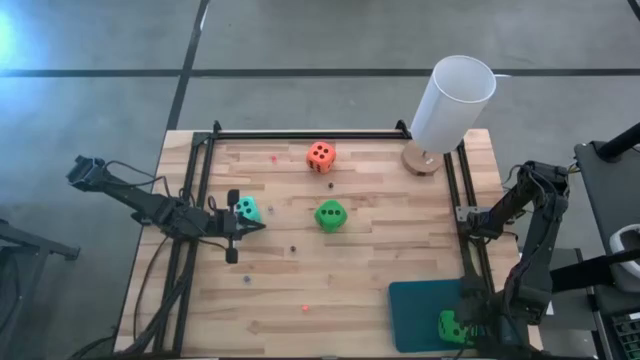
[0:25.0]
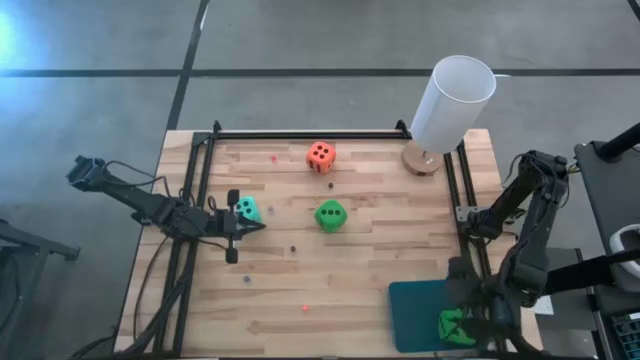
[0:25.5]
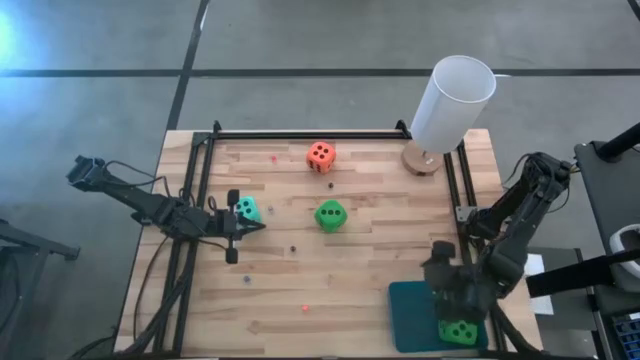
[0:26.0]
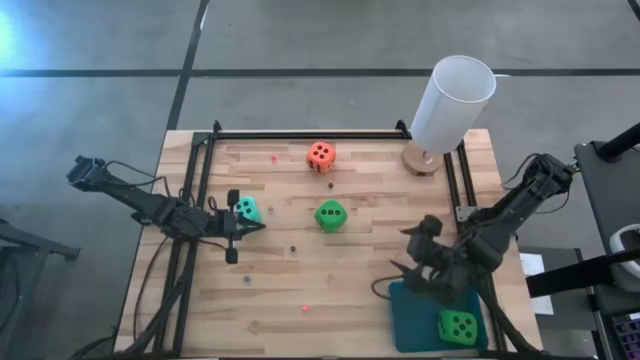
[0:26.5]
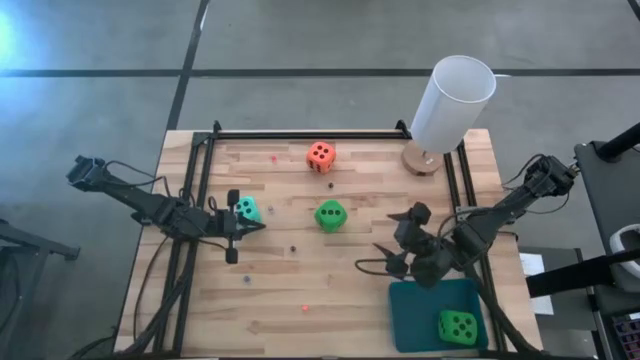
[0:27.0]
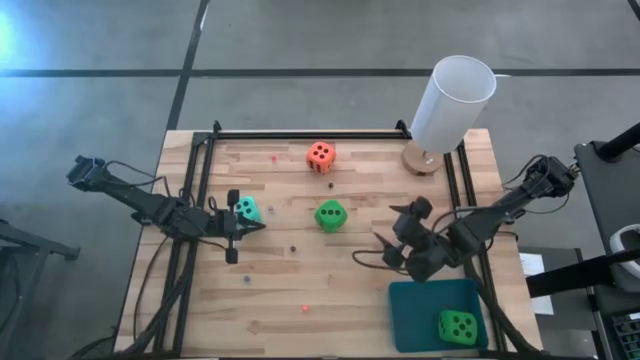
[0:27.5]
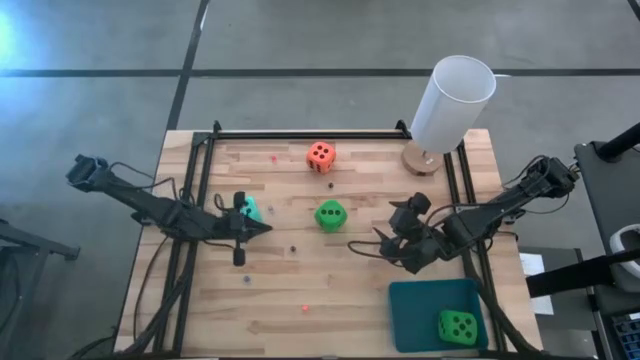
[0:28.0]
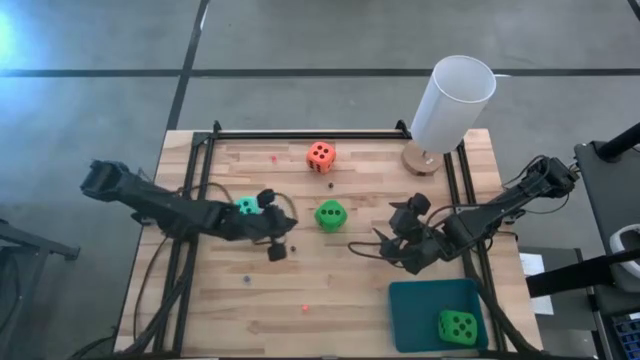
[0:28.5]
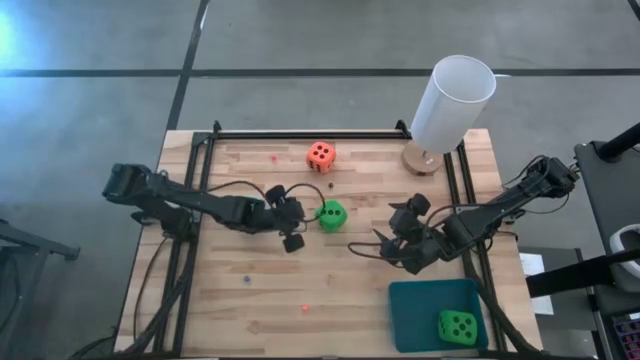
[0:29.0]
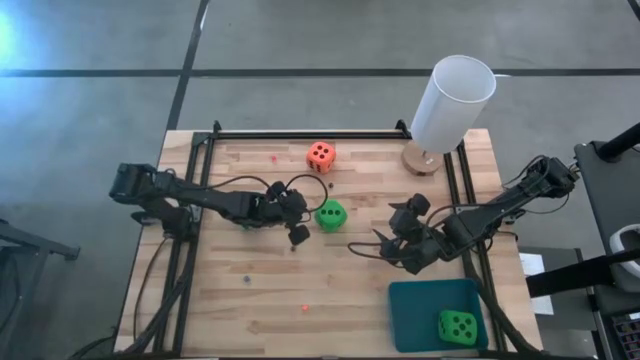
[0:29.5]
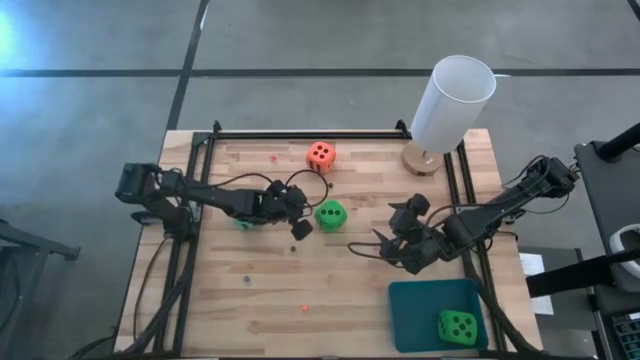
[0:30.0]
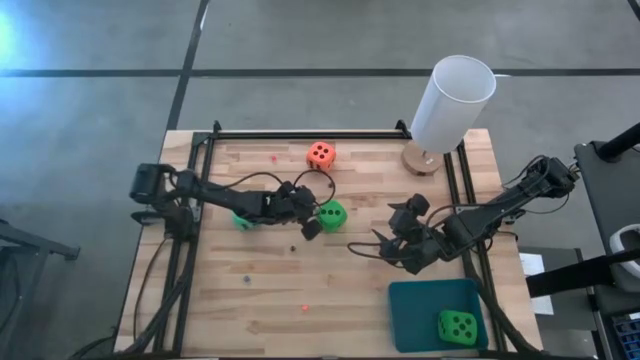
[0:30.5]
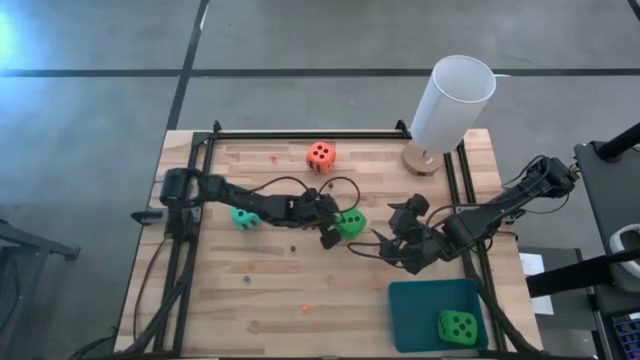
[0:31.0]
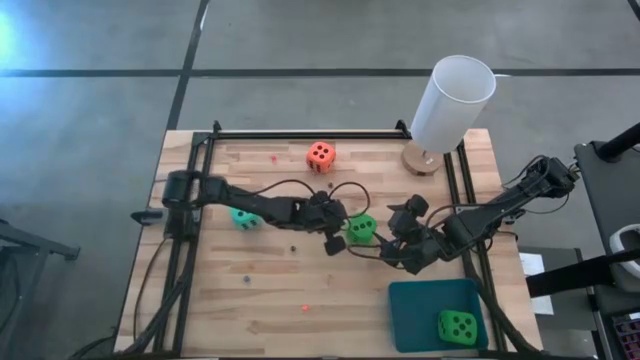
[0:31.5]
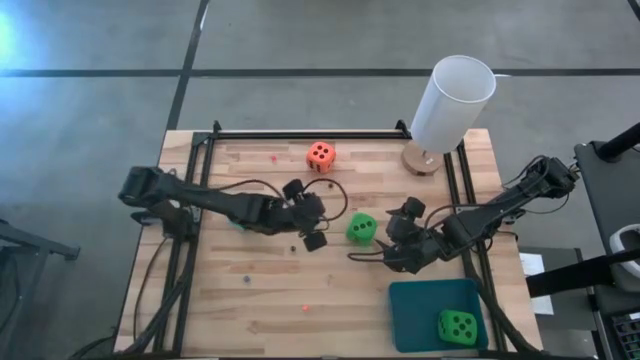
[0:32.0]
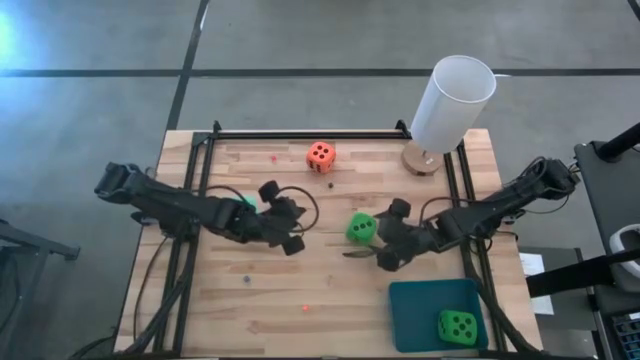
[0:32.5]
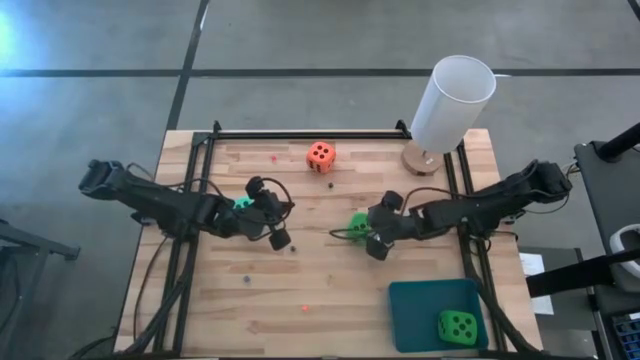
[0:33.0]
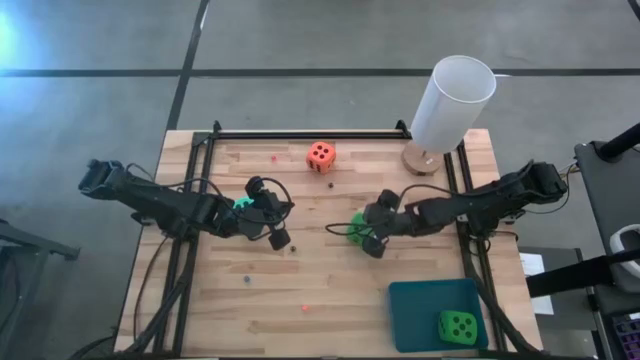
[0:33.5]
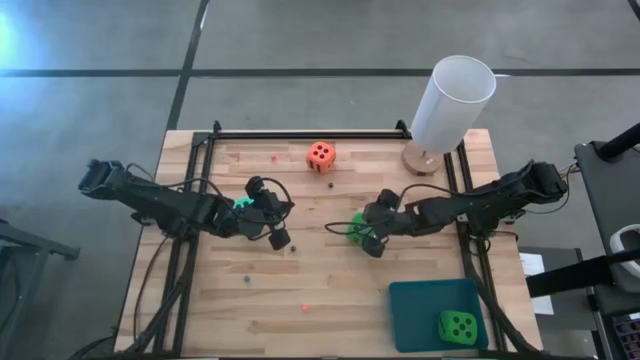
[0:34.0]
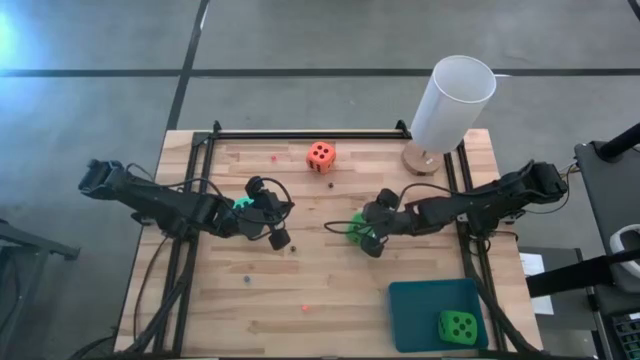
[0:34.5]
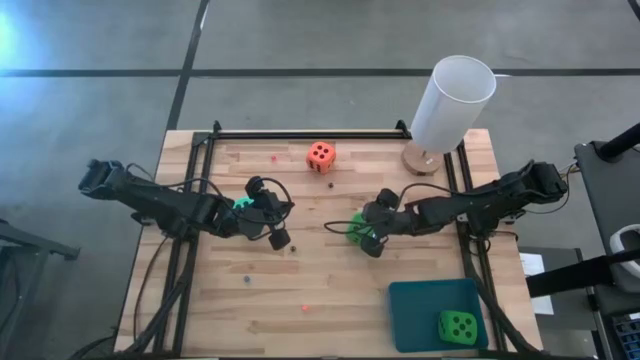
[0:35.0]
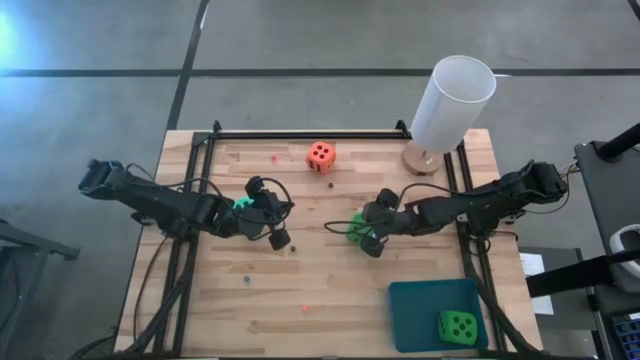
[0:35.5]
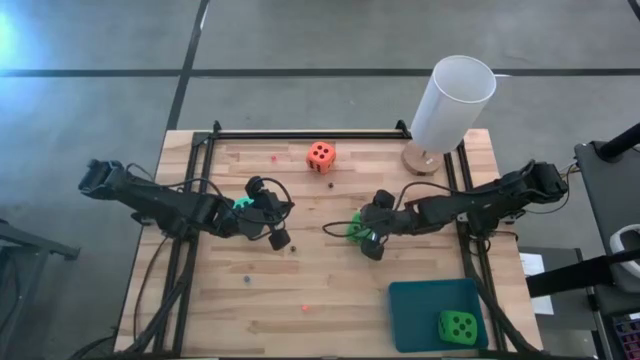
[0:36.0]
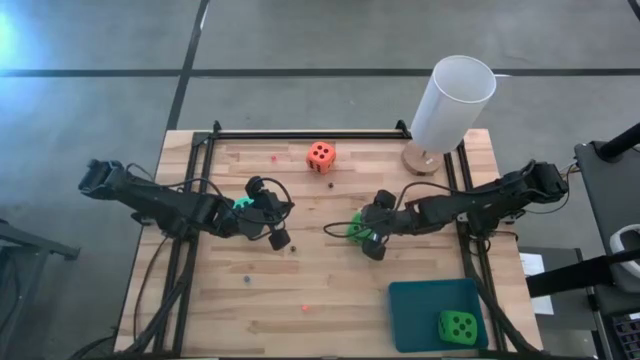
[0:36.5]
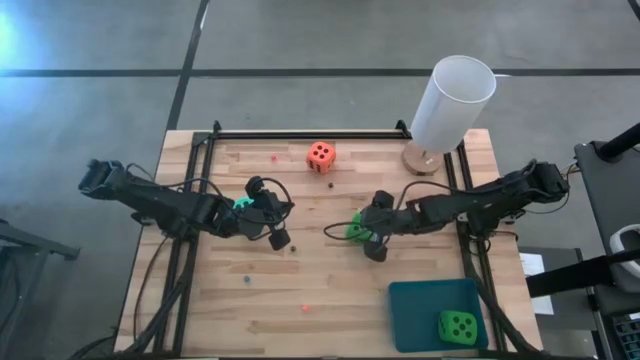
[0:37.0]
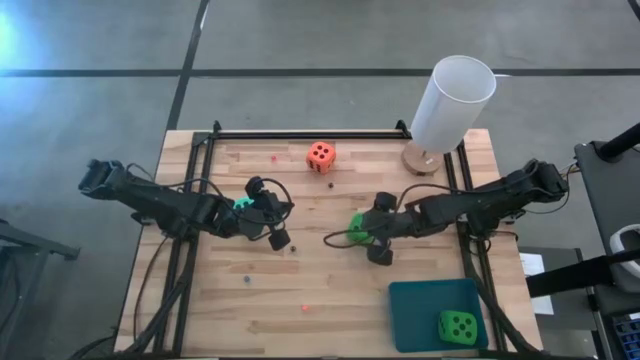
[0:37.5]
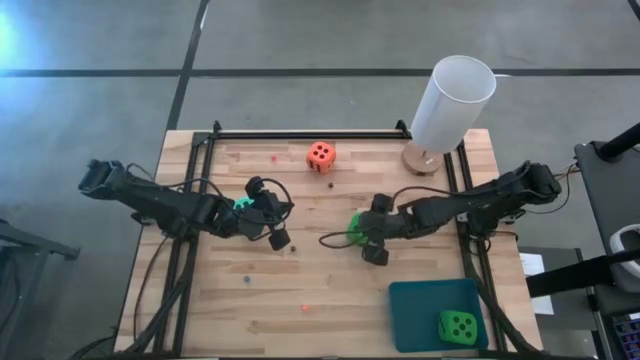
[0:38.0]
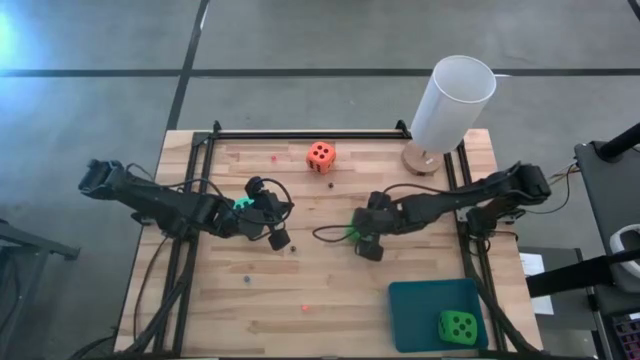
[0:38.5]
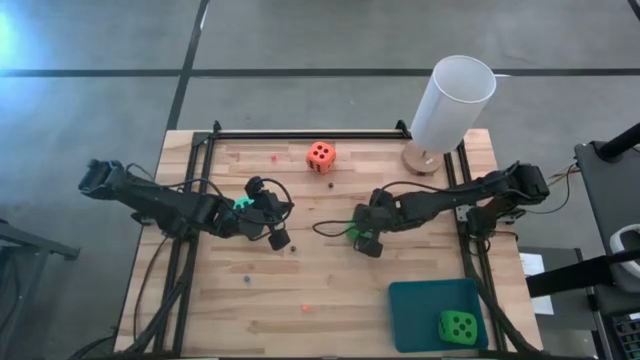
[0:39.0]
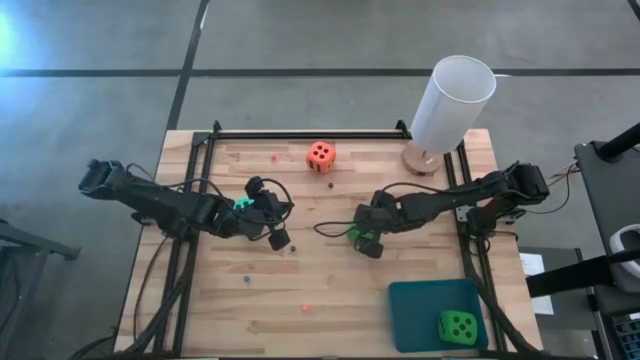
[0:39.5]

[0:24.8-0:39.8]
Task: Pick & Place Dice
Put the large green die into the blue bin

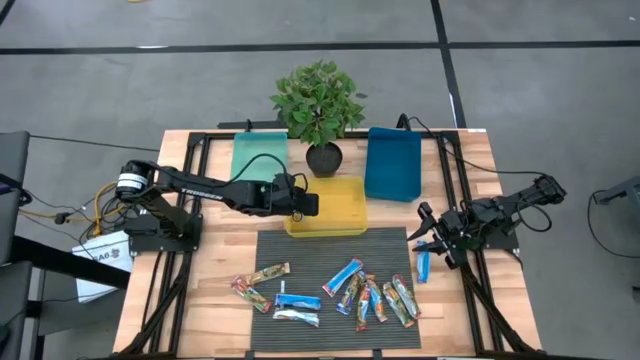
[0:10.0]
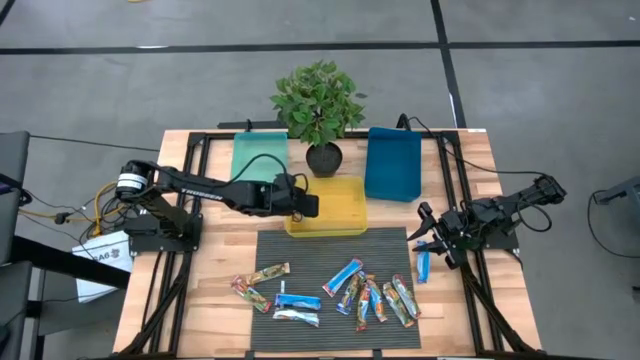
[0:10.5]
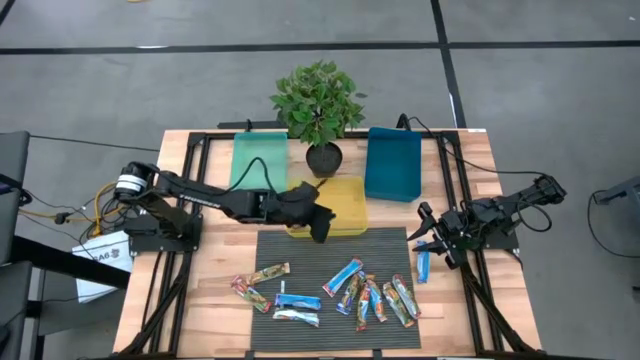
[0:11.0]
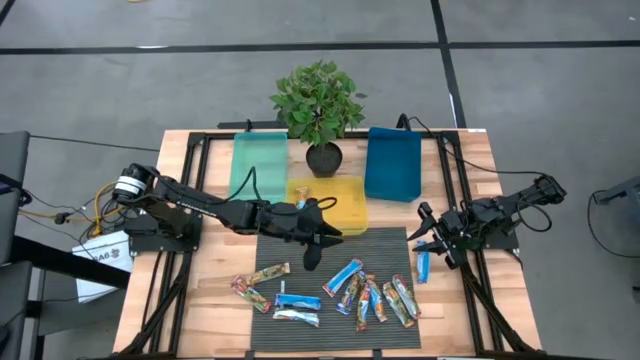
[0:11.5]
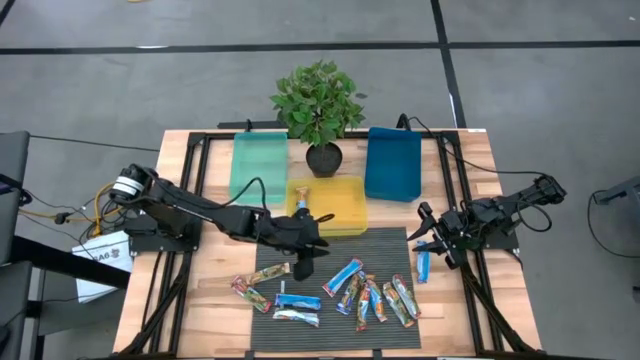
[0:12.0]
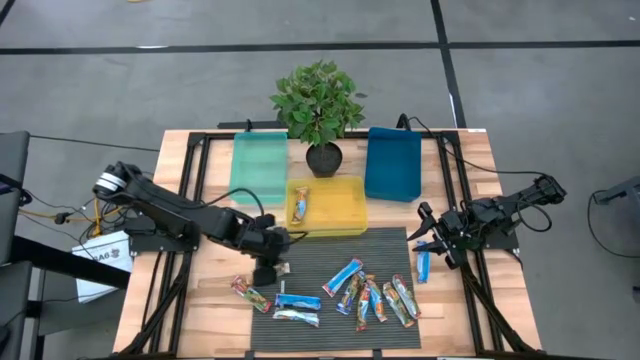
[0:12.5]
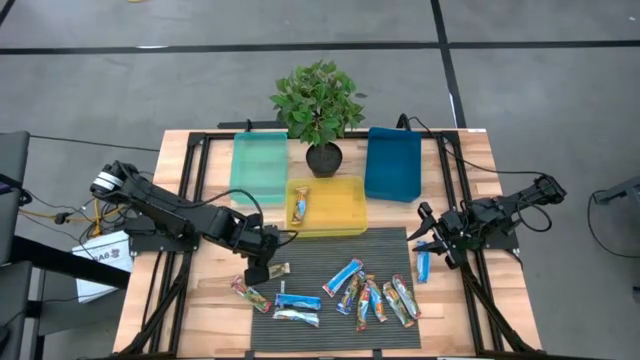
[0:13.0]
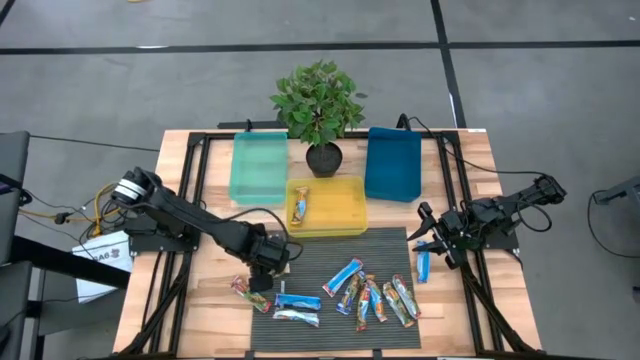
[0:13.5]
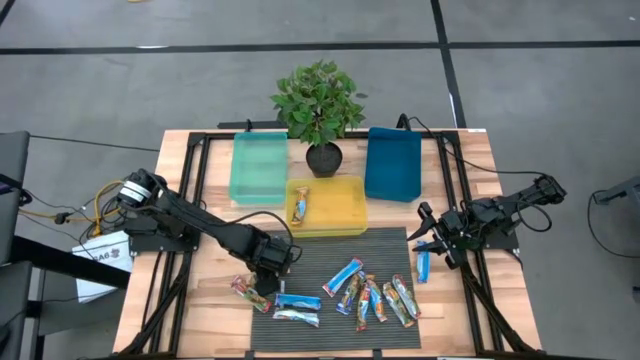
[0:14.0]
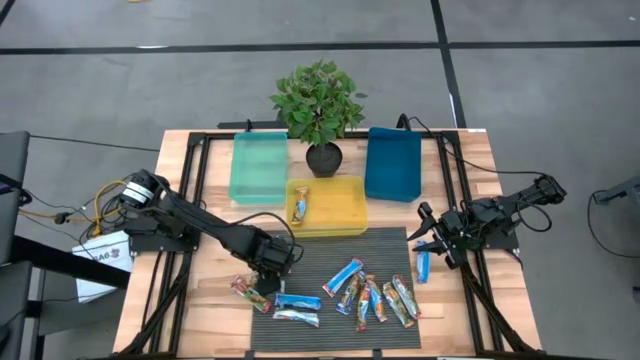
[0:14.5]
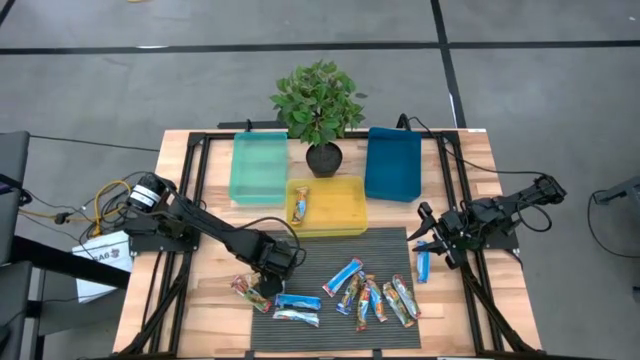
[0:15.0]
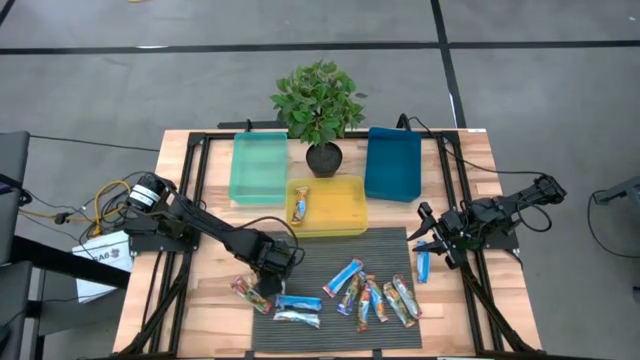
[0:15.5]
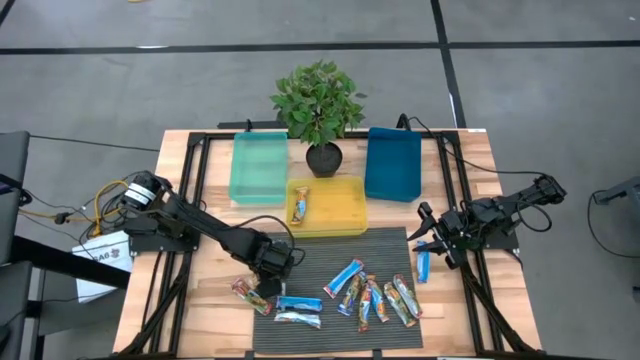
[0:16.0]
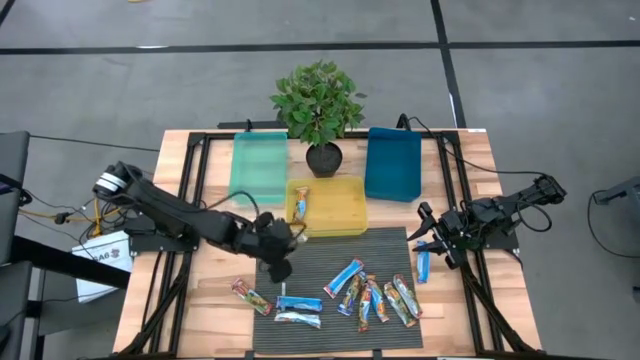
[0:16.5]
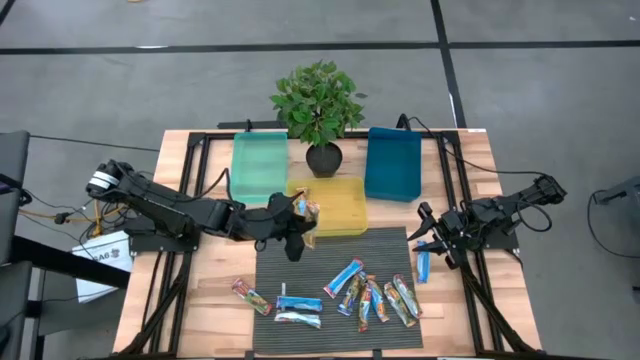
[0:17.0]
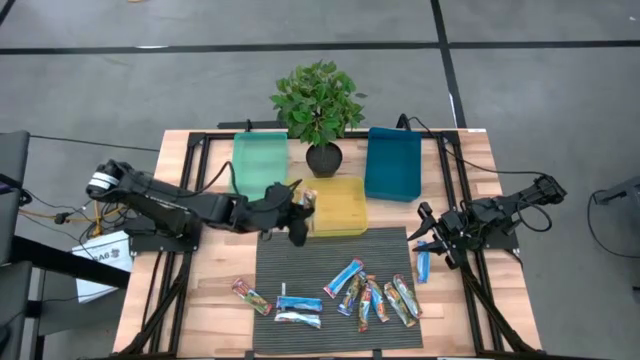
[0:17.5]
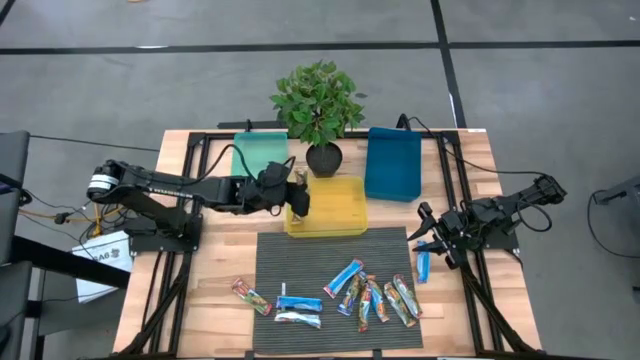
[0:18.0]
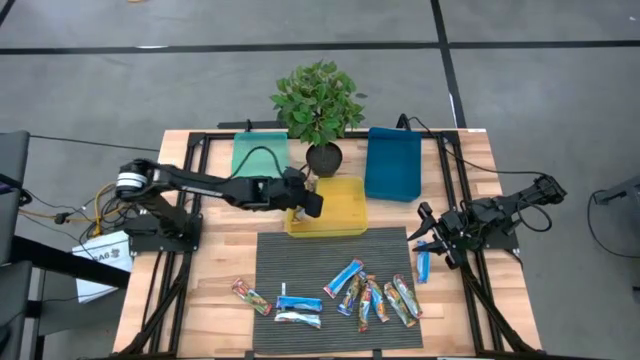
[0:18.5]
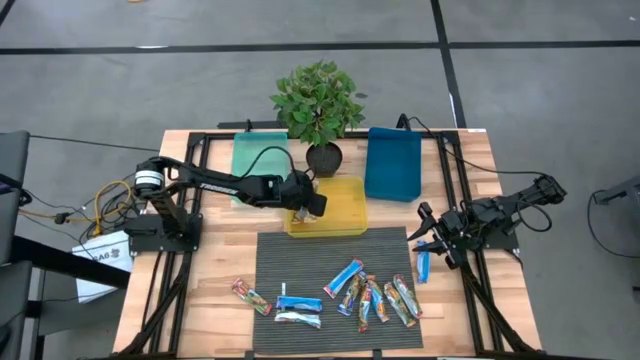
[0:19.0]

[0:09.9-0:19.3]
Task: Pick and place Granola Bars by type
Put the orange granola bar into the yellow bin
